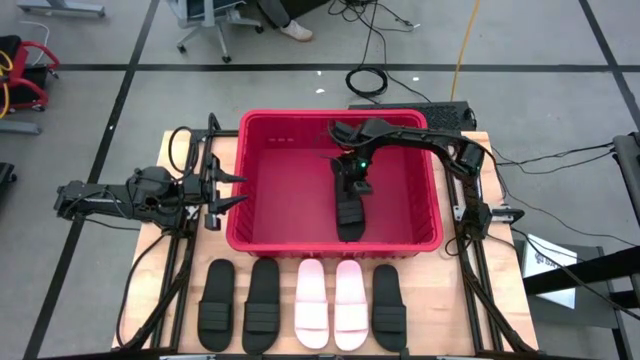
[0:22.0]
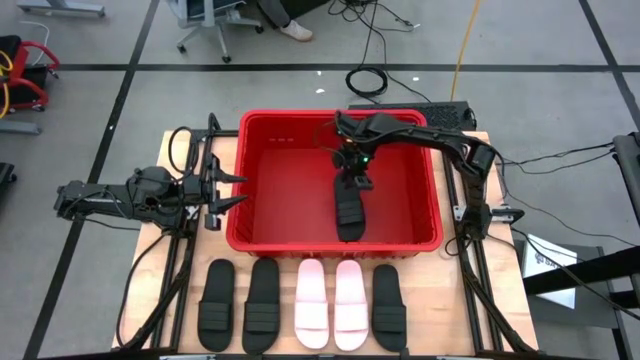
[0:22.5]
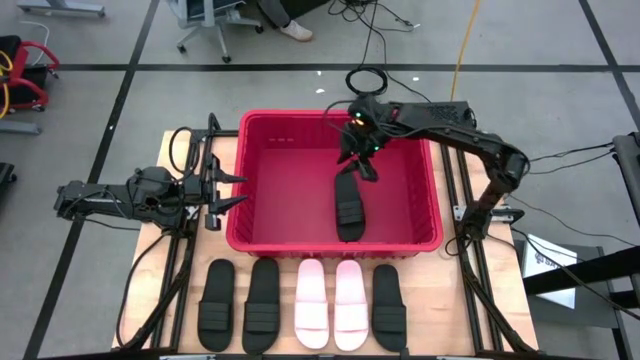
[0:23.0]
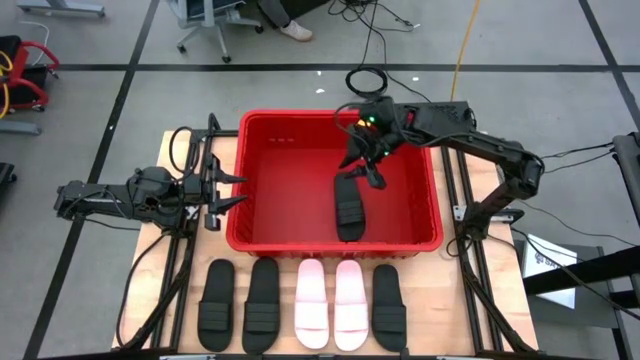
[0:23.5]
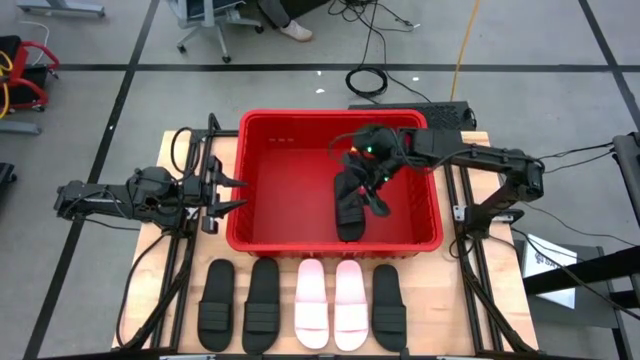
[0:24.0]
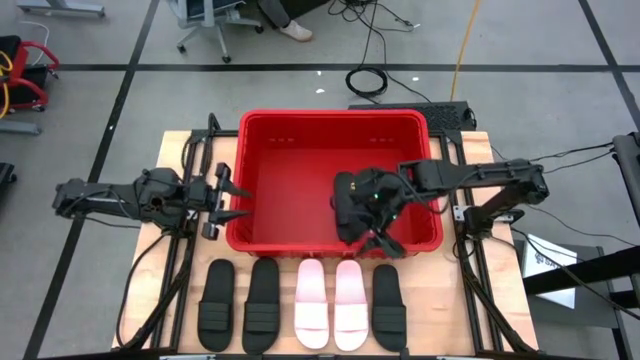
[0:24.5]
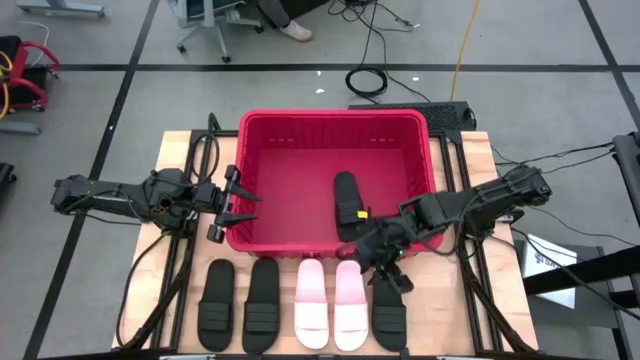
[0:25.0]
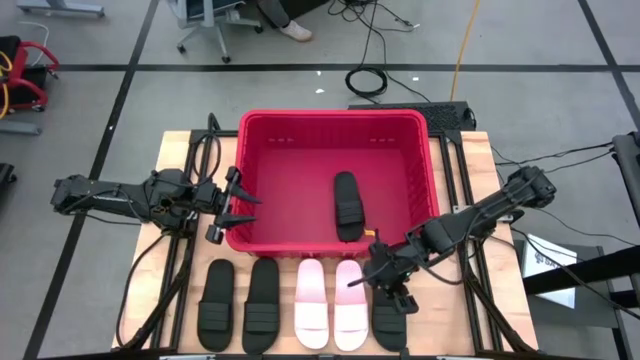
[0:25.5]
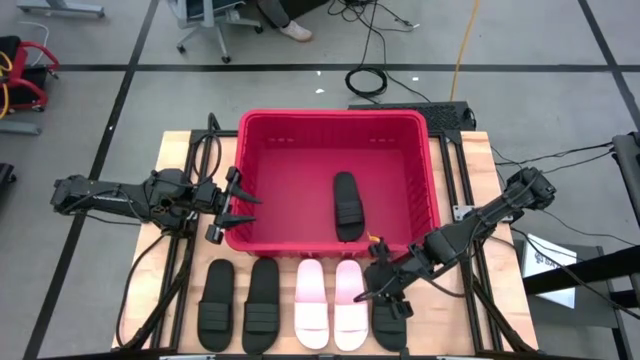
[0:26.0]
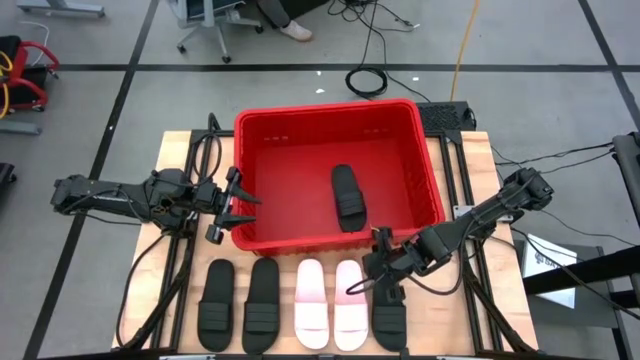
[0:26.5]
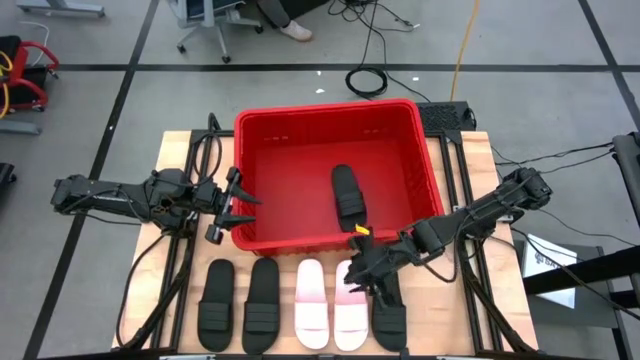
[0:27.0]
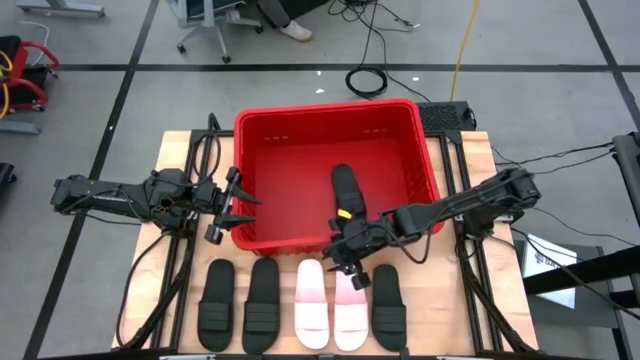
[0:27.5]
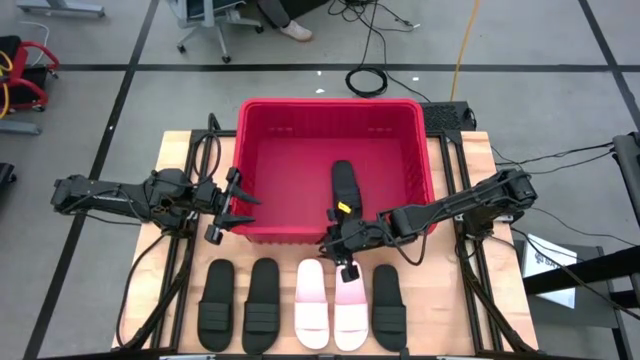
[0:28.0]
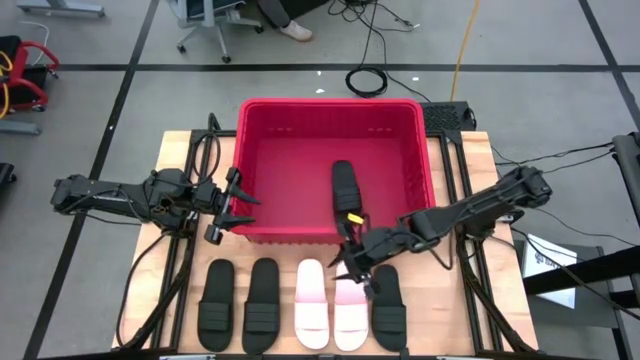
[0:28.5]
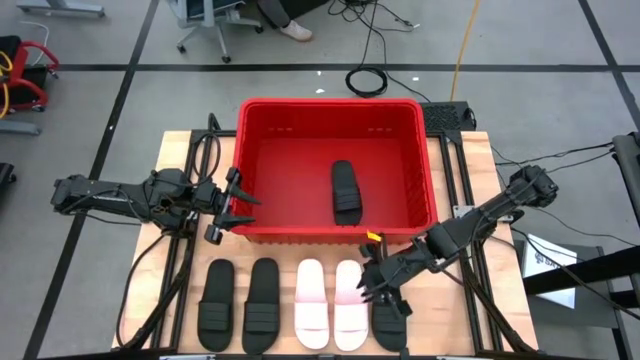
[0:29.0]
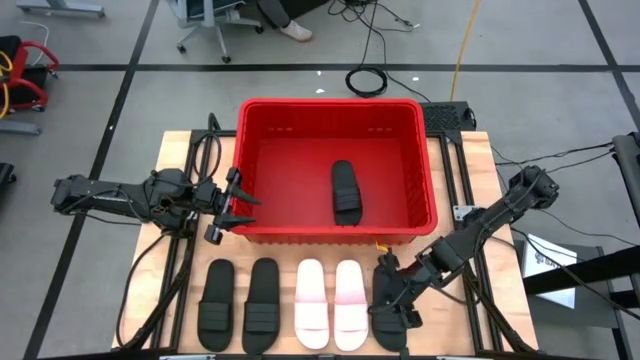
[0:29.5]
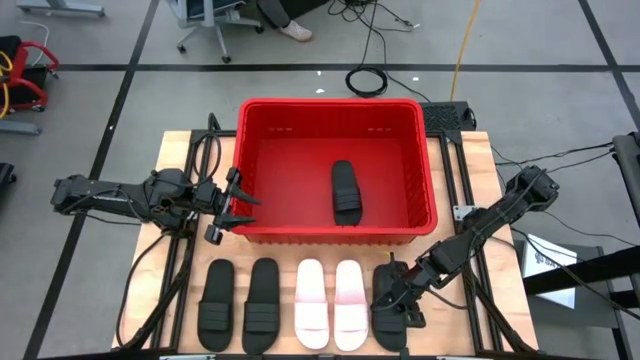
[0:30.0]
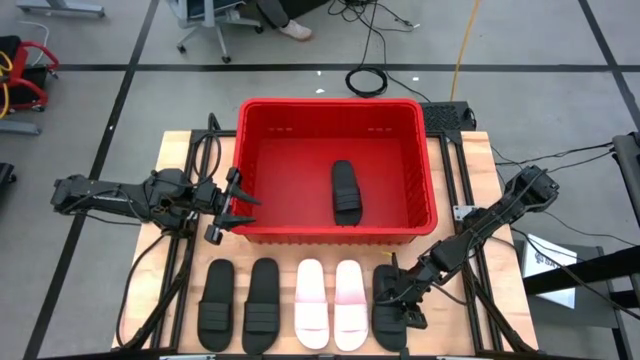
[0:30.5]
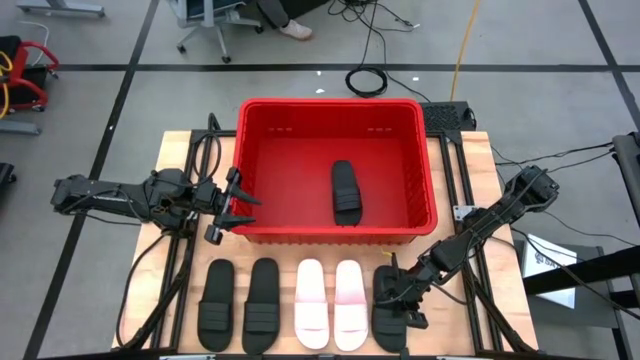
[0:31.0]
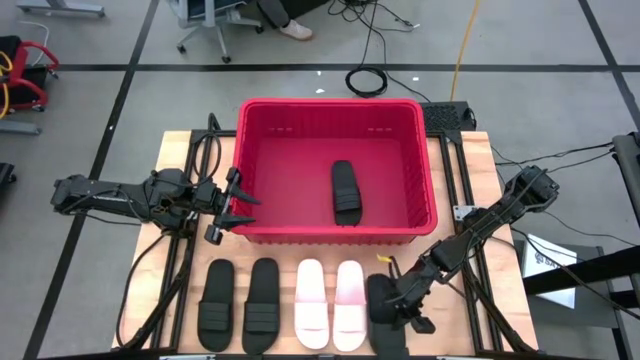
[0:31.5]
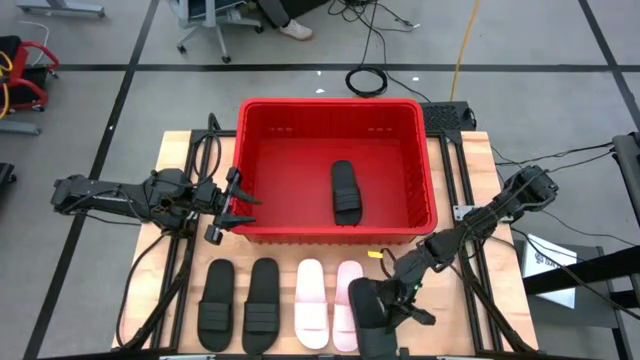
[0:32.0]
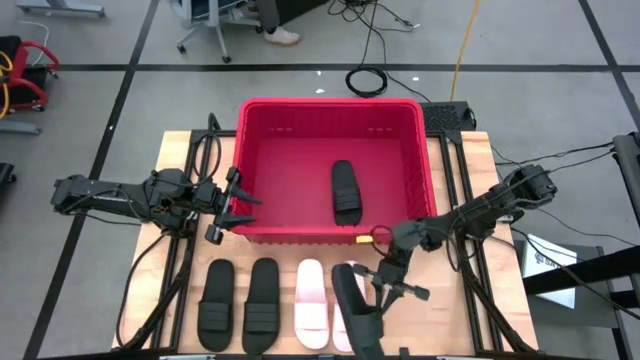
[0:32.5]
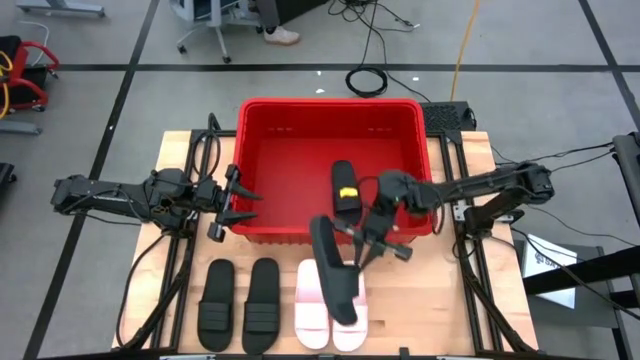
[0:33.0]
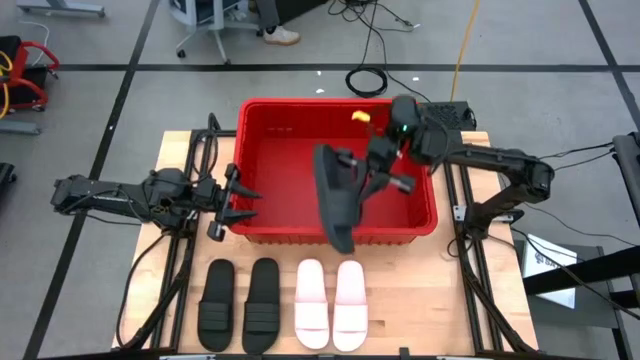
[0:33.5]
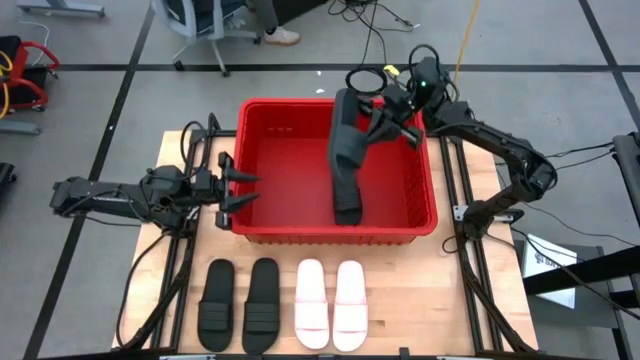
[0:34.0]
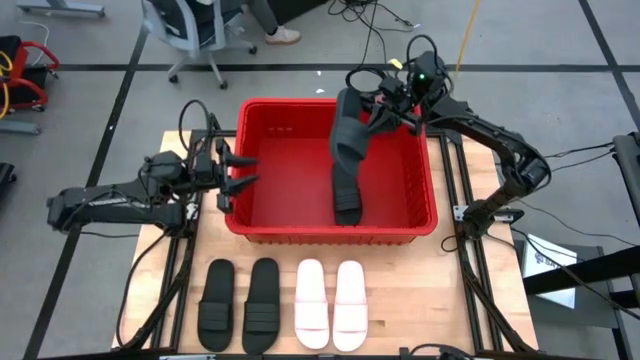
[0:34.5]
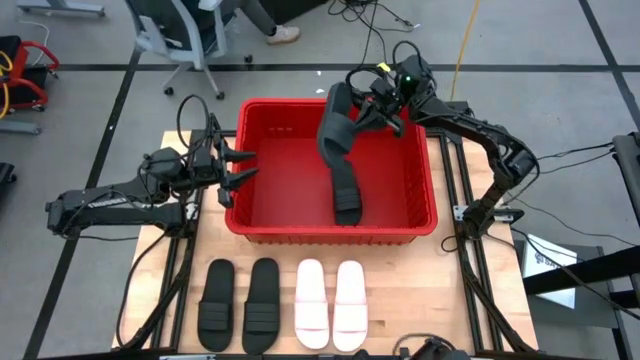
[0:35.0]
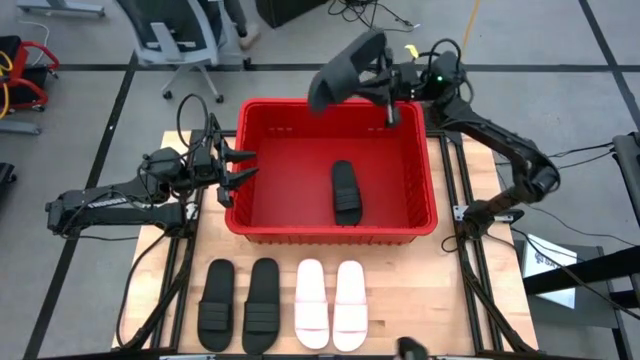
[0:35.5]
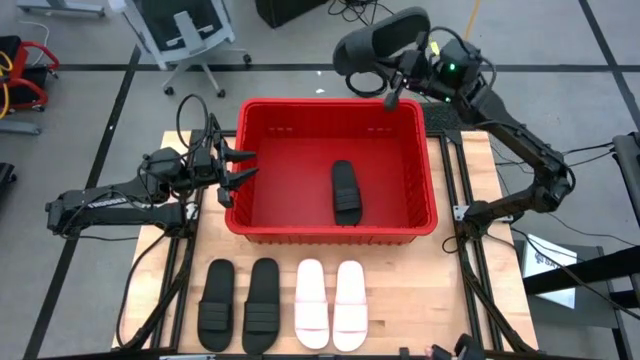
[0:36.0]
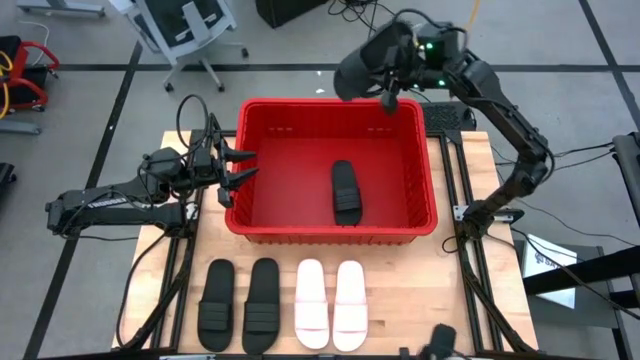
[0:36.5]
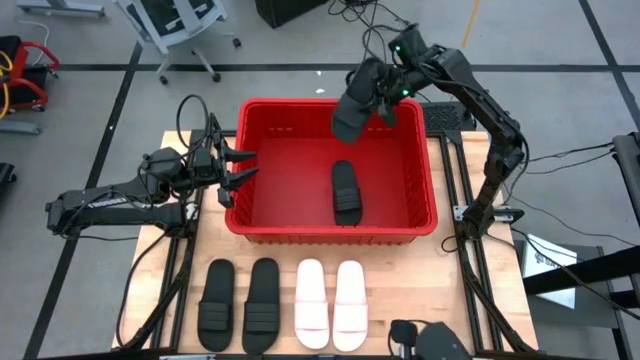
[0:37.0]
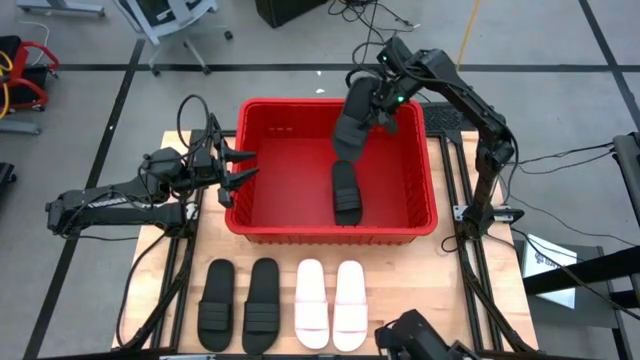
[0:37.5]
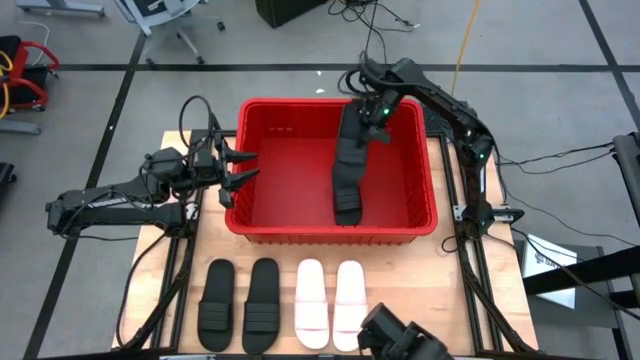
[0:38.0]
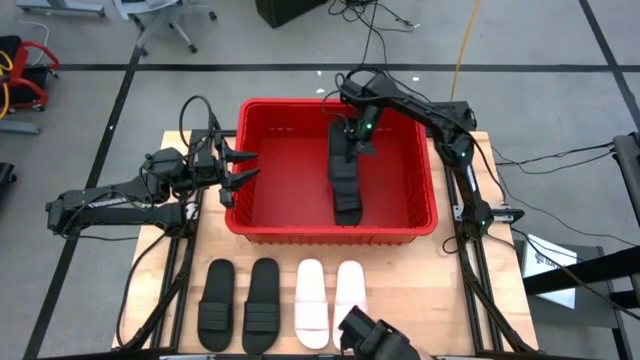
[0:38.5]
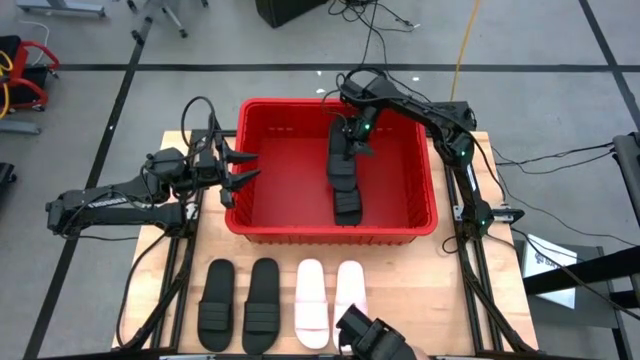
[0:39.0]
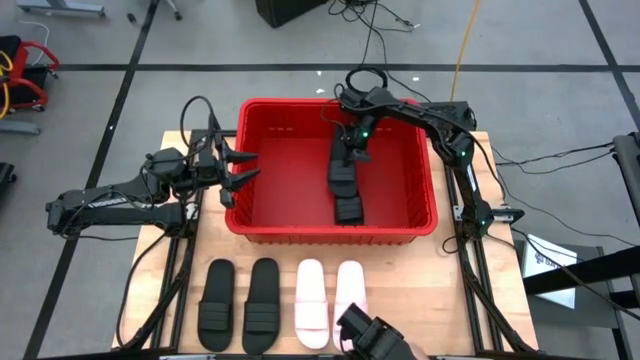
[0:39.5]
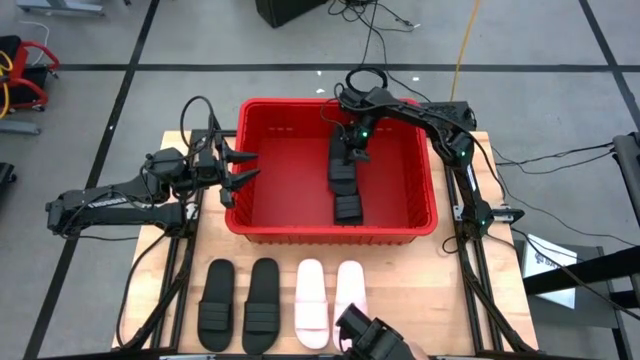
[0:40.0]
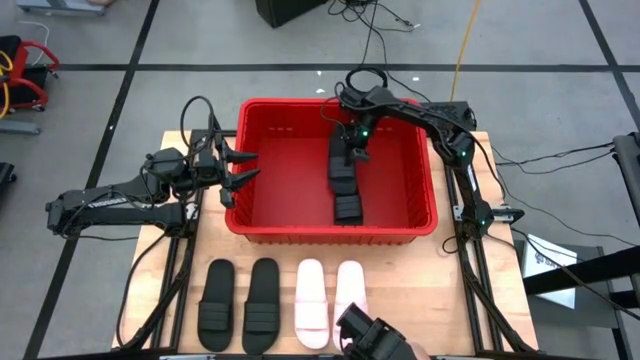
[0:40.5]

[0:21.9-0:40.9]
Task: Pick and place slides into bin
Put the black slide into the red bin

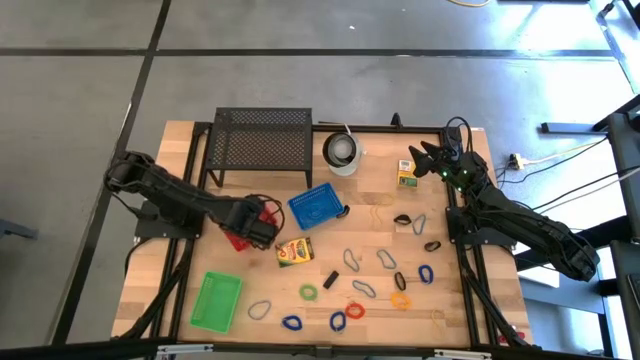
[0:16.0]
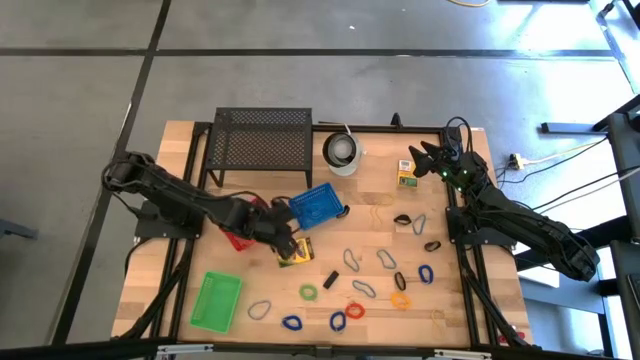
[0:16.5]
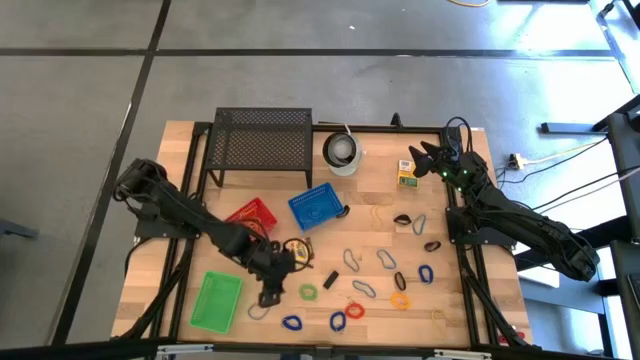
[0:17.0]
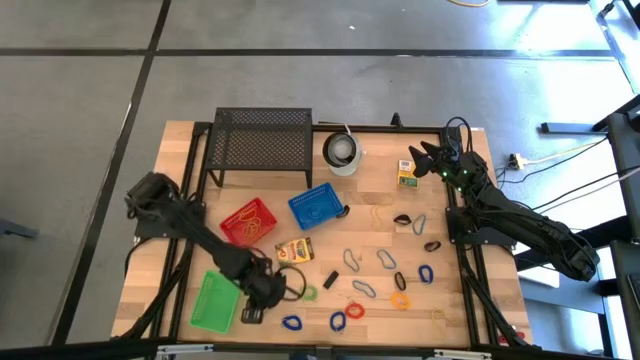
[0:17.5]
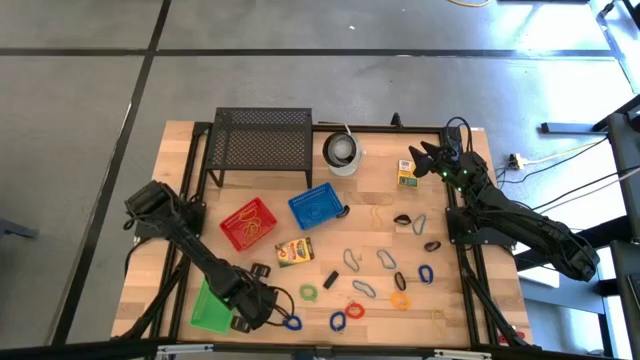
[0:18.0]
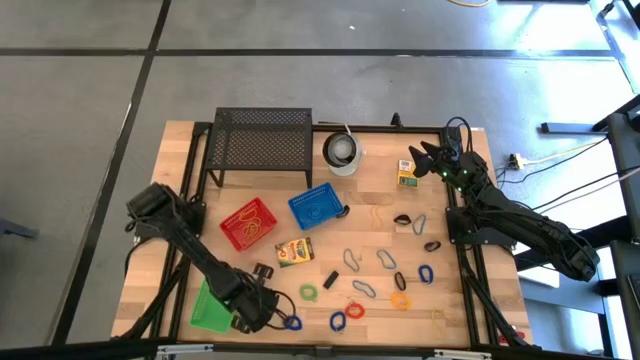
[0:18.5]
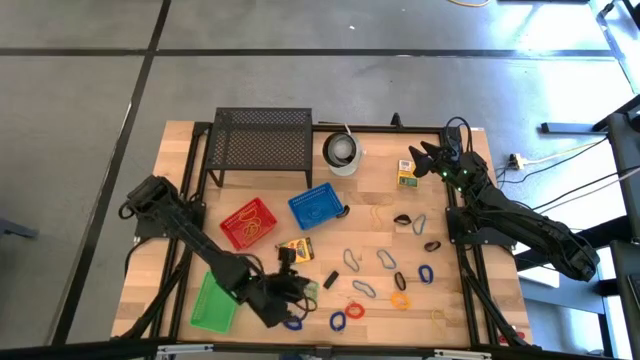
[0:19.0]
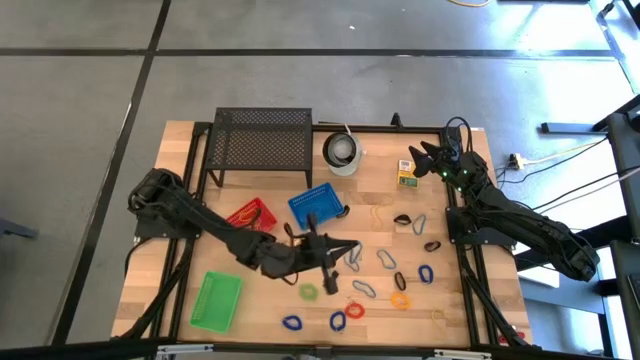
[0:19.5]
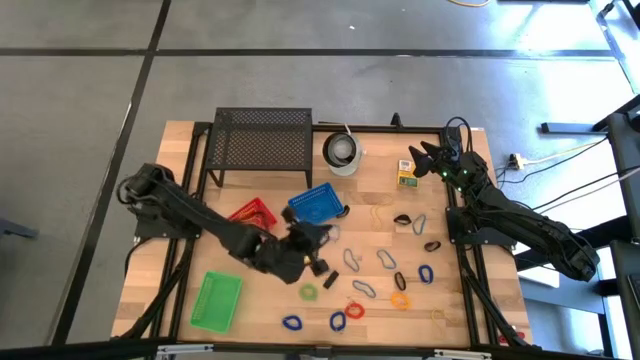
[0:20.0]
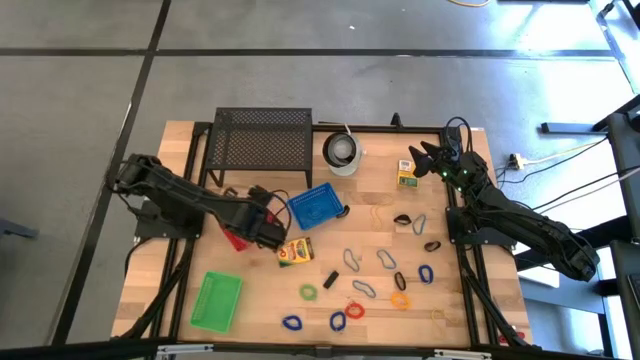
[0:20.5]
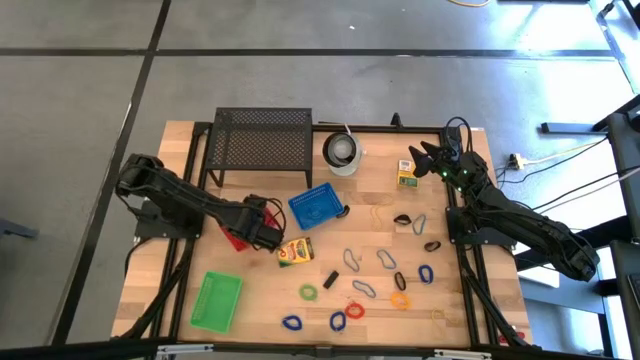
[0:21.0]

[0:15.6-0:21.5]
Task: Pick & Place Office Desk Supplies
Put the blue rubber band into the red bin
